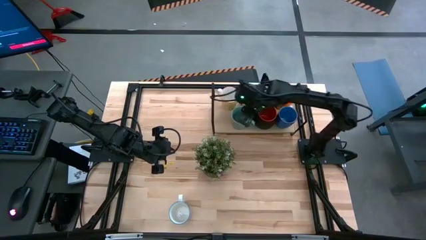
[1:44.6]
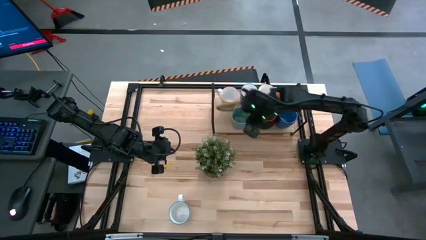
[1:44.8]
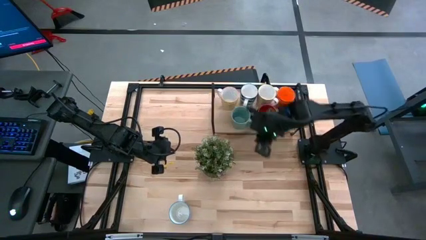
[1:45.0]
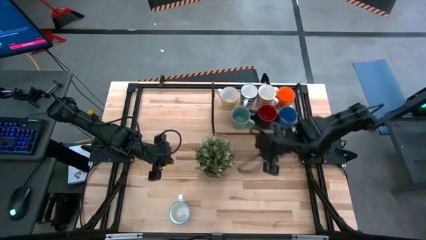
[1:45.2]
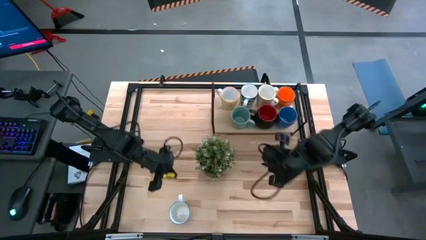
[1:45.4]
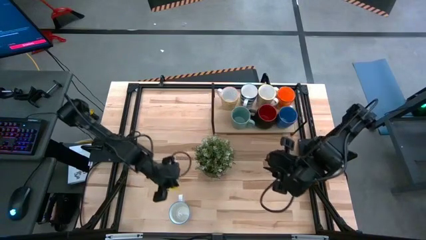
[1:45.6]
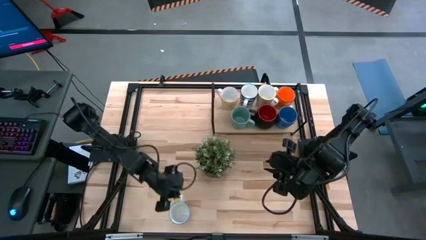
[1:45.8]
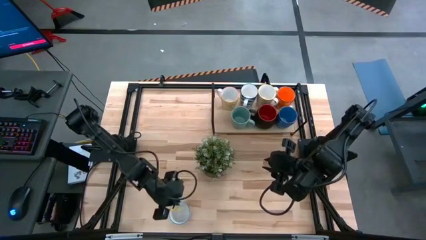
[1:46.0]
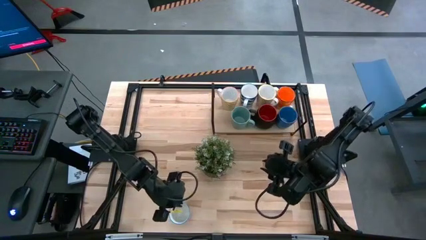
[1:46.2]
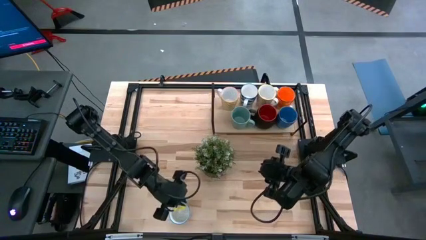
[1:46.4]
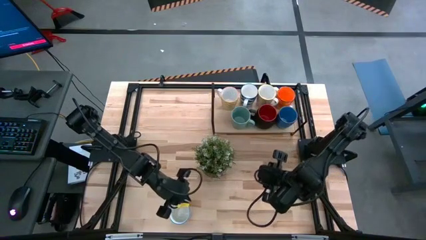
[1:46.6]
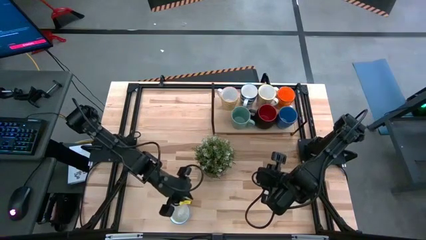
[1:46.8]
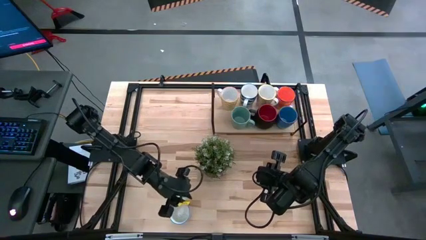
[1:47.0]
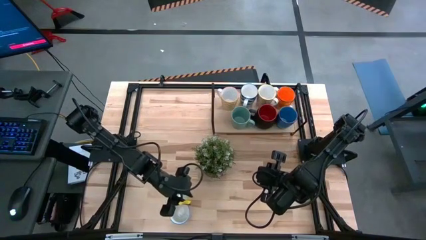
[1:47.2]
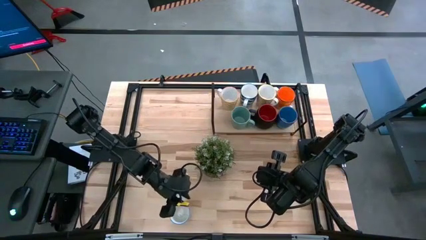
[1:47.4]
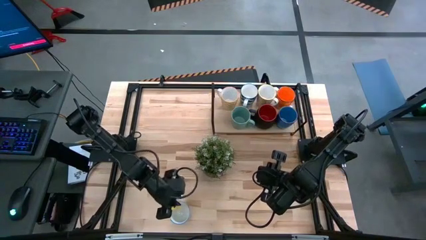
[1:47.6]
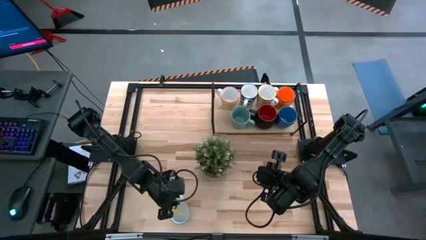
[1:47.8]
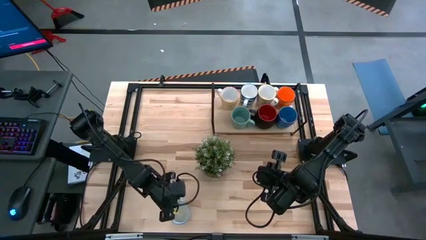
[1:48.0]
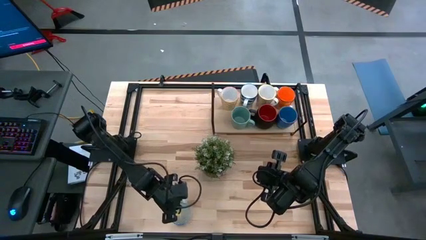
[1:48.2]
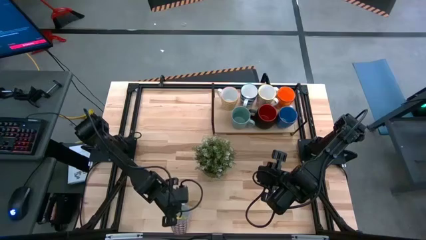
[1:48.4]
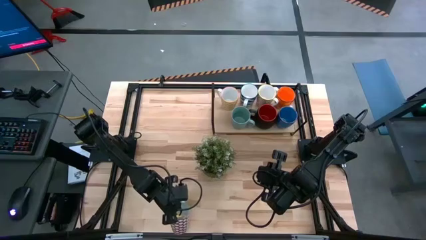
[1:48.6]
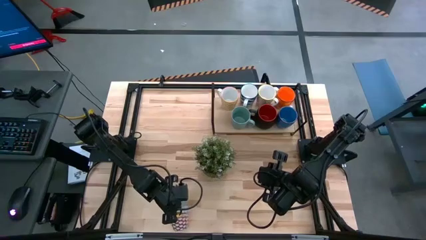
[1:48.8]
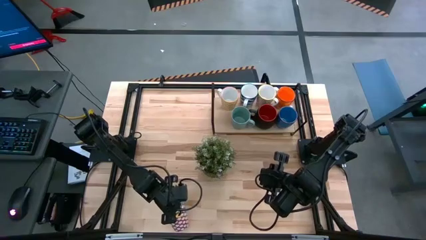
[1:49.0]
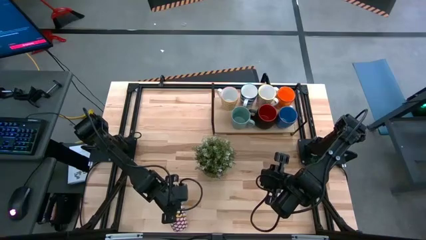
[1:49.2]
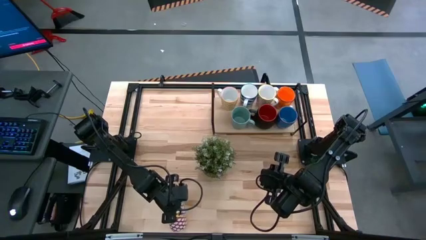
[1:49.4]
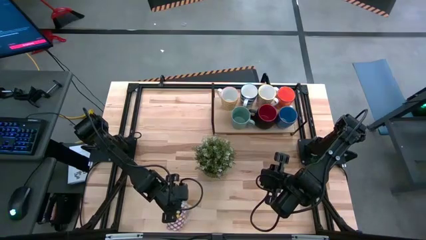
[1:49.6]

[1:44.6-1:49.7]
Task: Place coffee mugs
Put the red patterned mug on the shelf

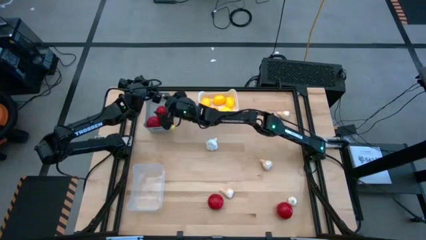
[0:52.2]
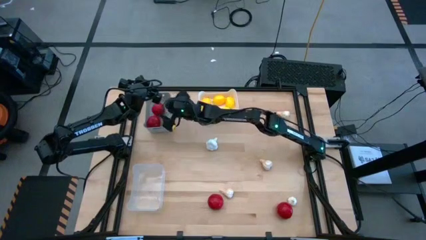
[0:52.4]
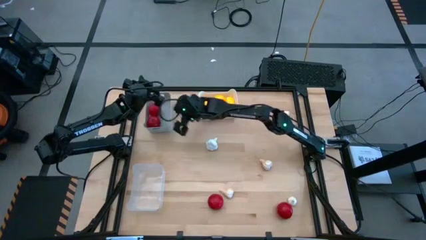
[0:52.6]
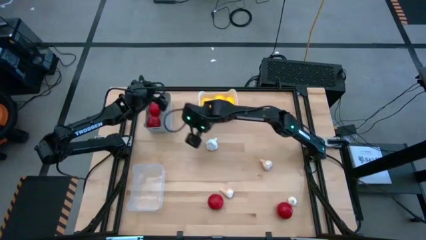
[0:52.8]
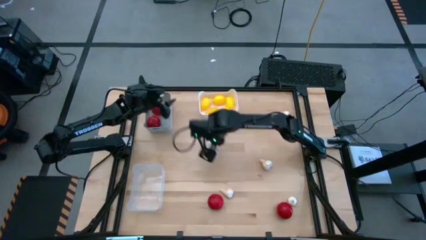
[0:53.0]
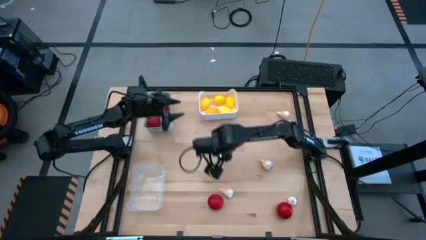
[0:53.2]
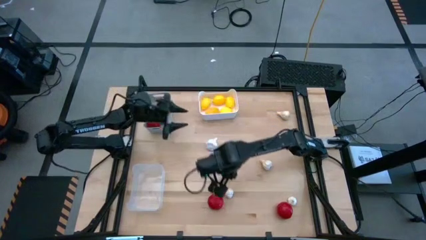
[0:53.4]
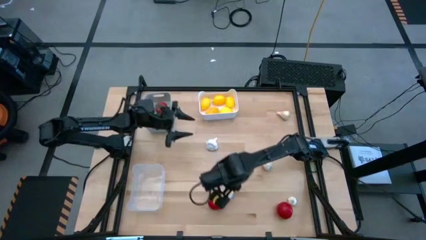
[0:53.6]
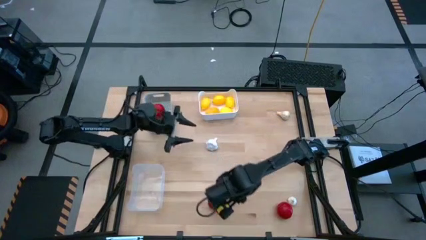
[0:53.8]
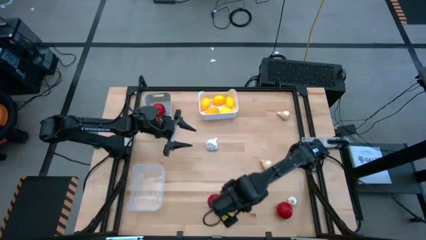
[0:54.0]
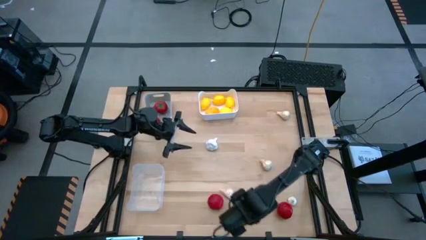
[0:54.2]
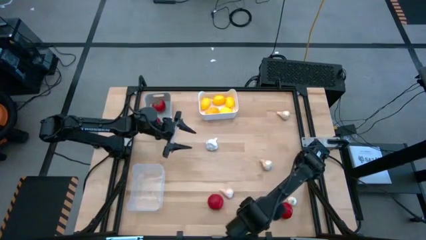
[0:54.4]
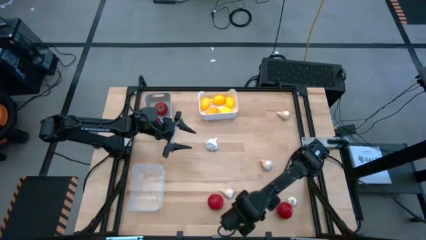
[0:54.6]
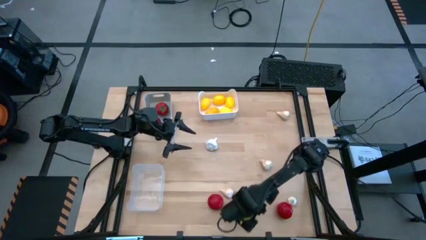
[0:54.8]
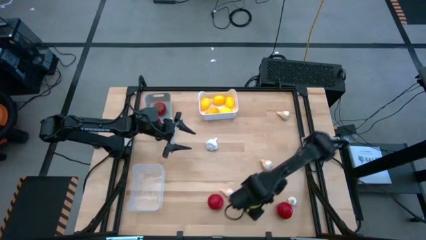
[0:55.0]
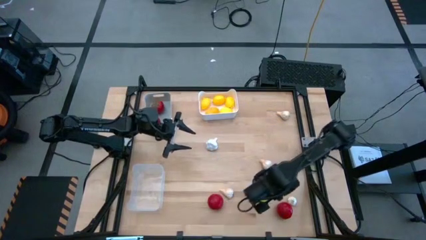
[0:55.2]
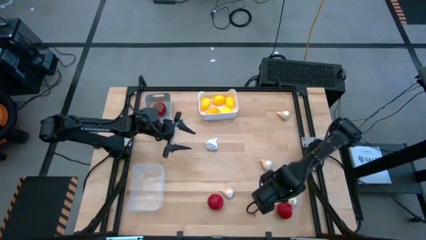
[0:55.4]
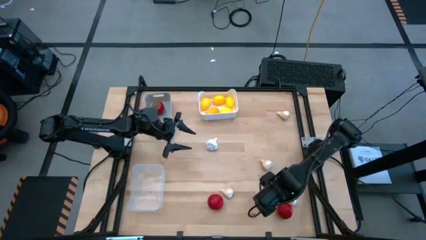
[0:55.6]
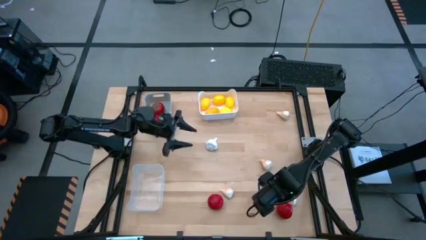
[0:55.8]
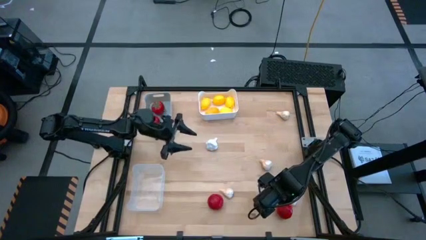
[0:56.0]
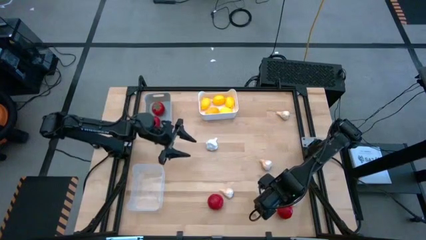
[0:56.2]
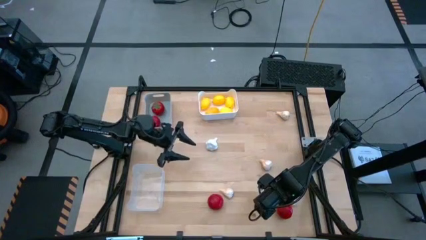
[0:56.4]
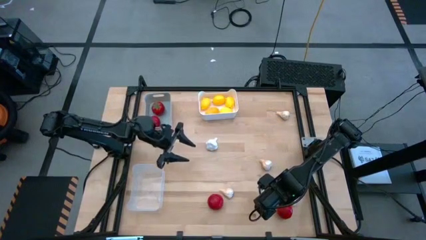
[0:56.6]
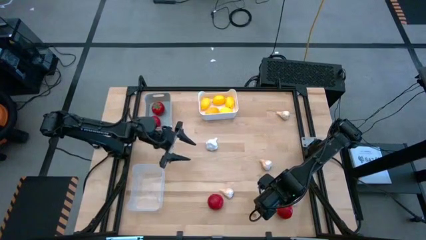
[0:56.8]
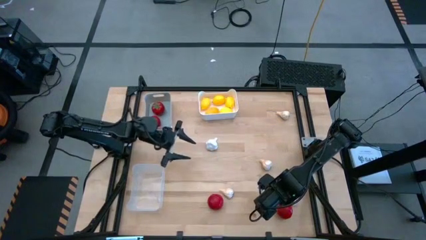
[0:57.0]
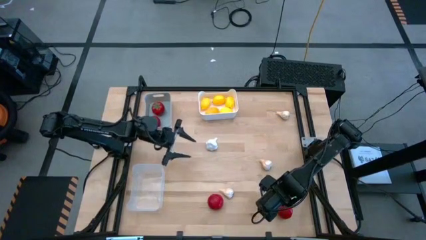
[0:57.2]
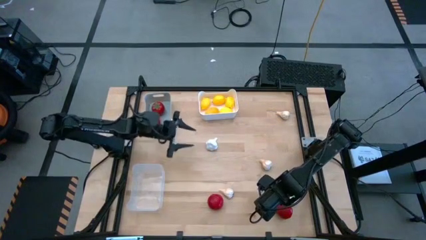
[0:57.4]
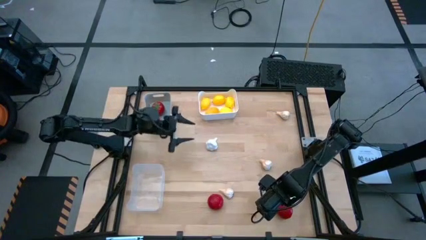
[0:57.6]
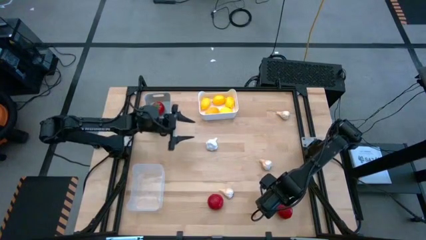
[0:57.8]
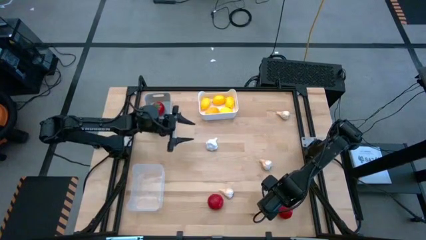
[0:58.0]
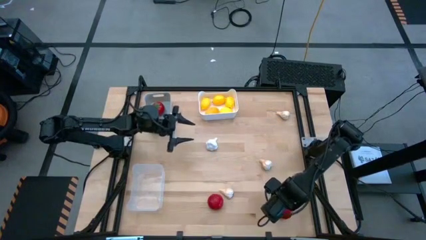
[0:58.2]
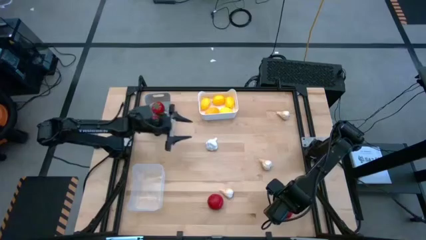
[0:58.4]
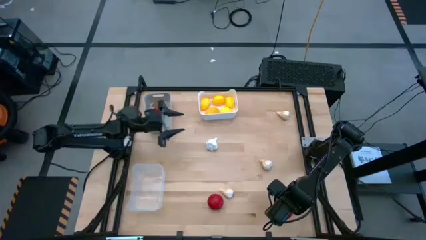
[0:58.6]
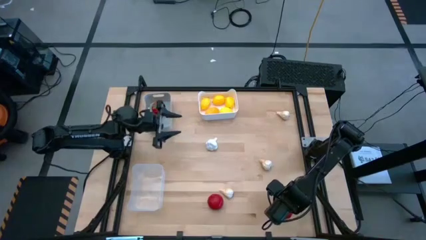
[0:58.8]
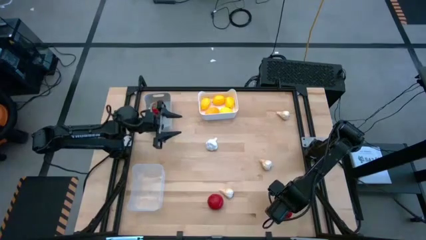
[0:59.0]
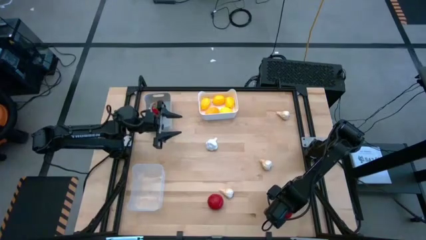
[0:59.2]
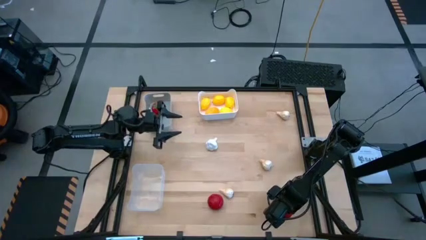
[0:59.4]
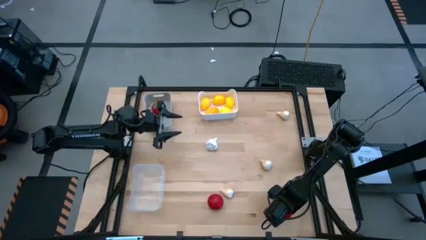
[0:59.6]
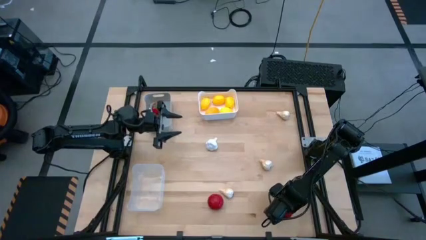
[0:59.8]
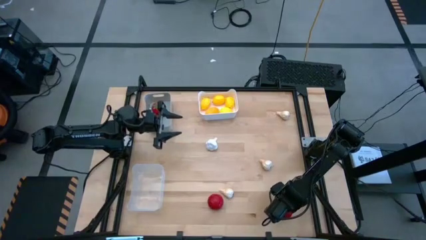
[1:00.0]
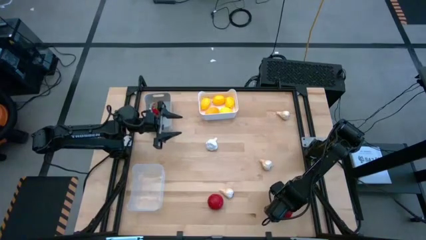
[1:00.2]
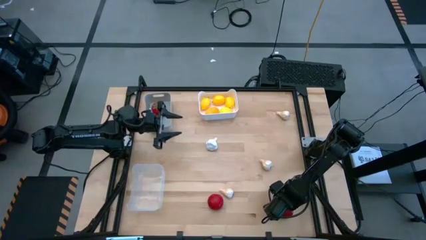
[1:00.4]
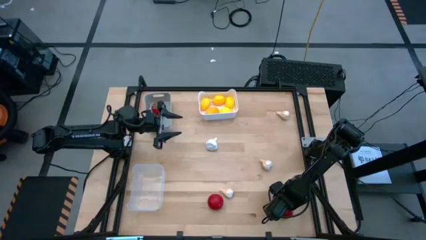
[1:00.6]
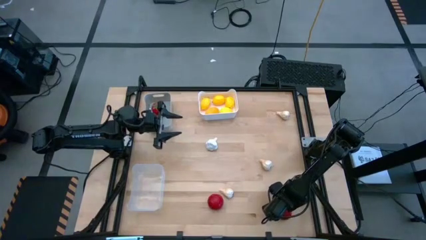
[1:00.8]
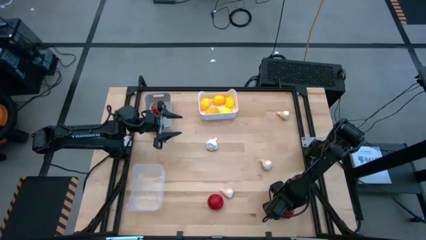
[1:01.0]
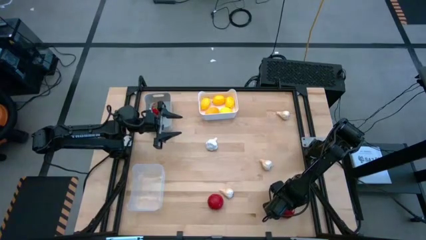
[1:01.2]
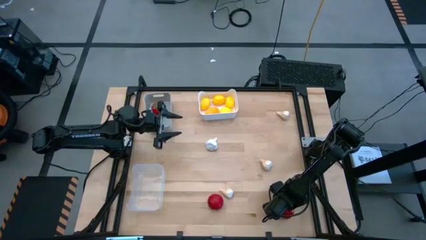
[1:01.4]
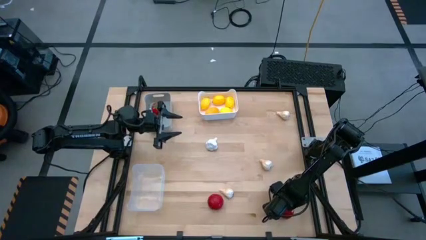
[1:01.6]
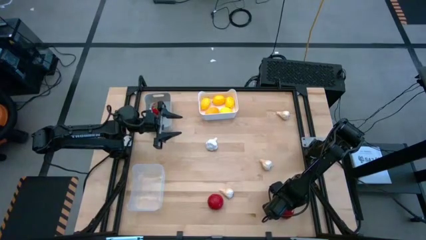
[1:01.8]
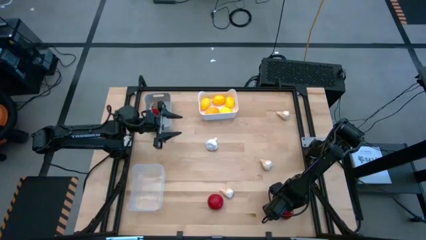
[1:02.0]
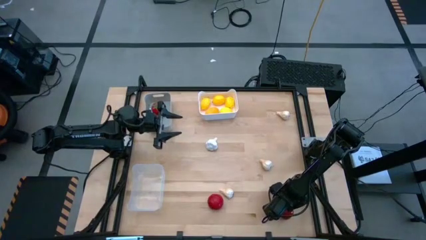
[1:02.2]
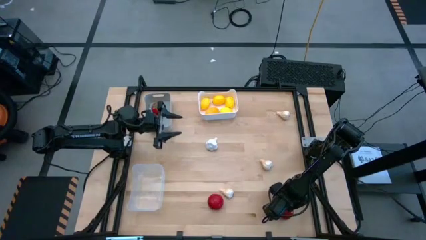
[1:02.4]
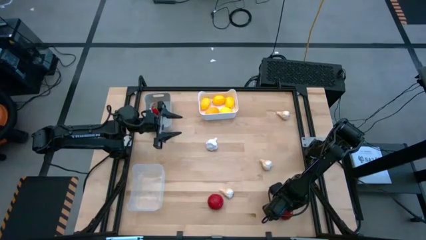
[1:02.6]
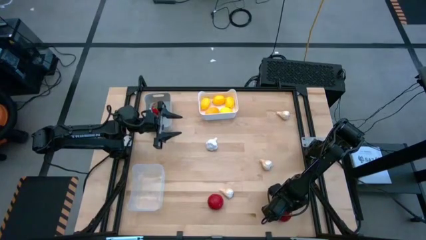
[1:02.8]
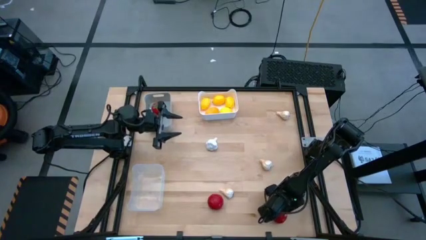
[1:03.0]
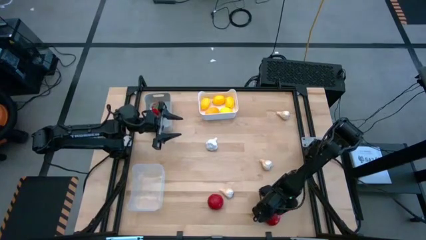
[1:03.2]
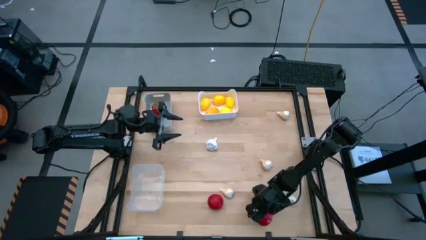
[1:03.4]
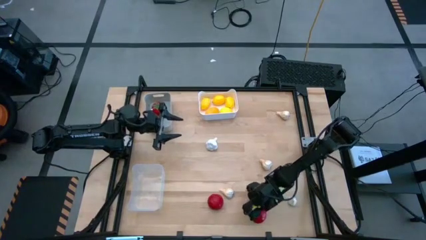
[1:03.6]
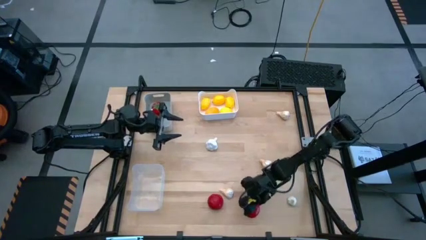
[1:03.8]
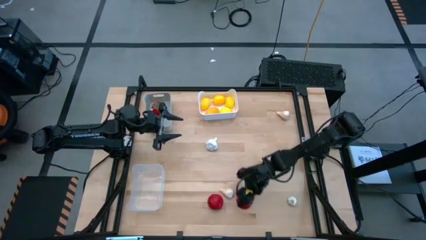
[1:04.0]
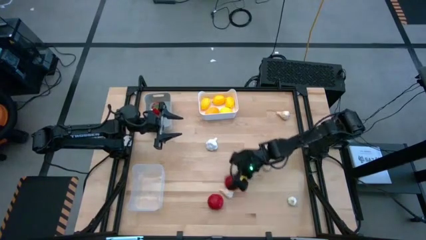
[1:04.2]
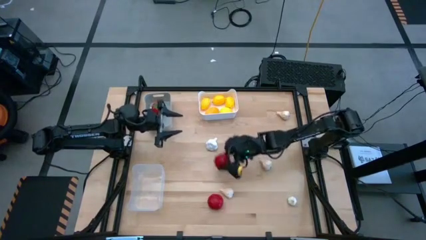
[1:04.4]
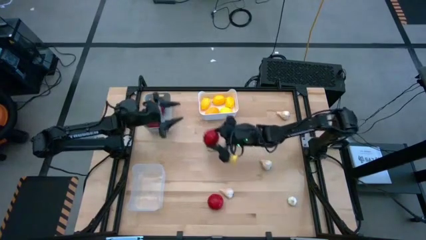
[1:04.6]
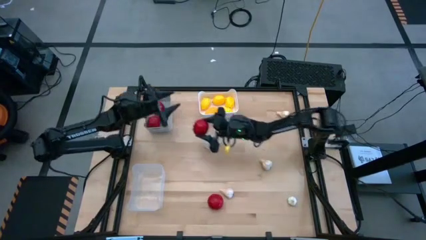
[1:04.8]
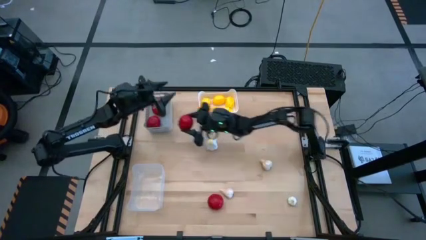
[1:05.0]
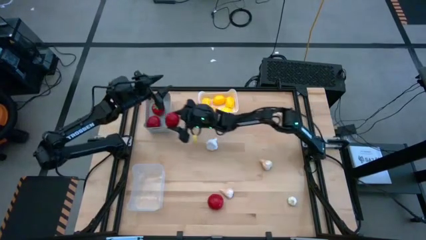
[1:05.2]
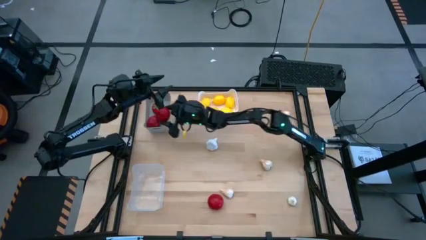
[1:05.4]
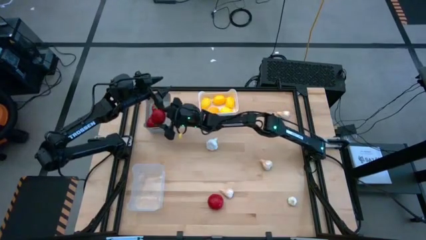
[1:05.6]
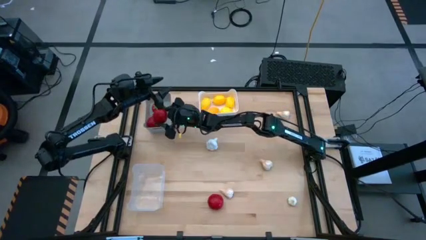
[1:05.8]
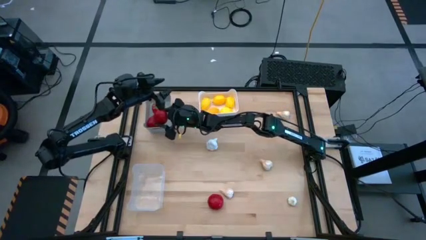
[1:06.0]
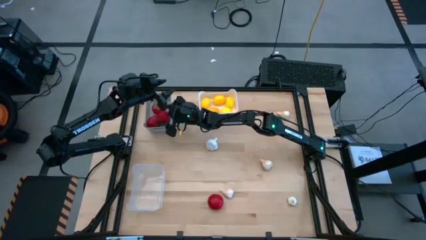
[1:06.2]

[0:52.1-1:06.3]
Task: Sort produce into baskets
Put the tomato into the gray bin
